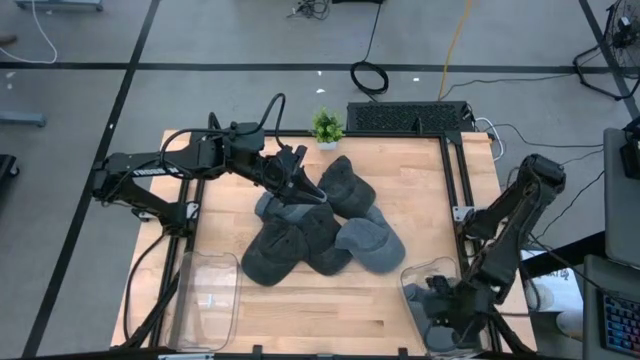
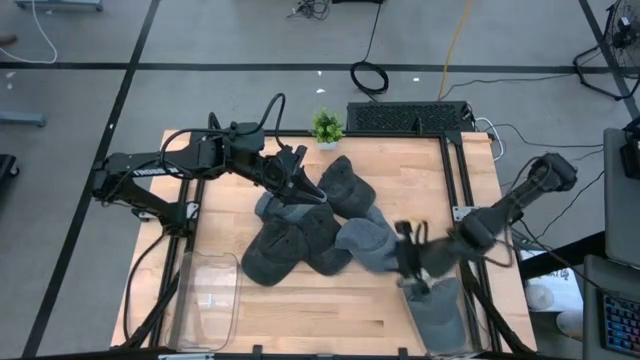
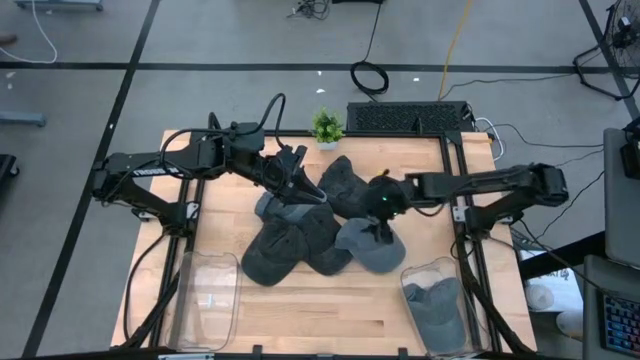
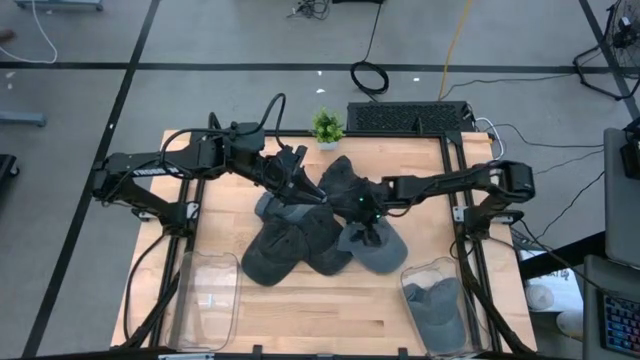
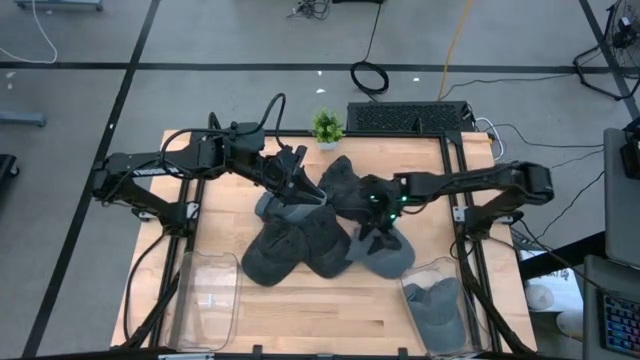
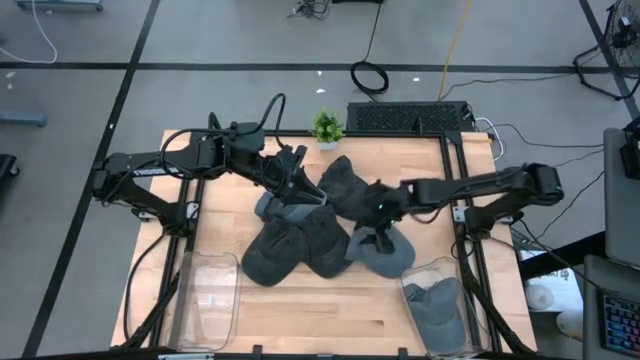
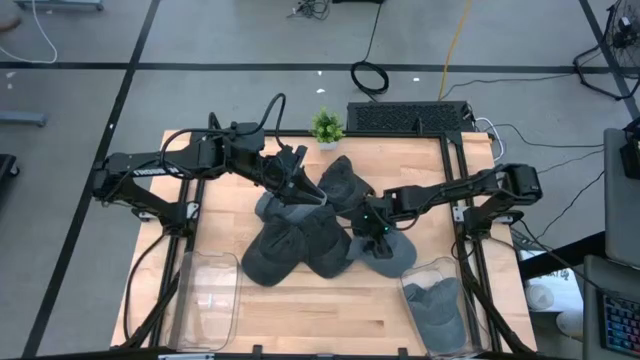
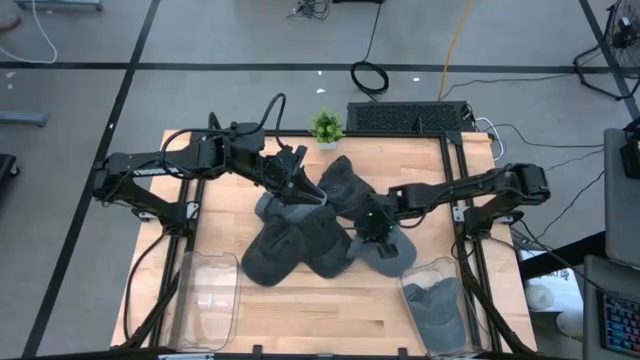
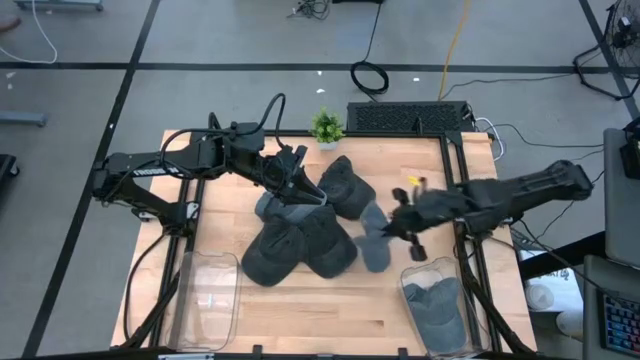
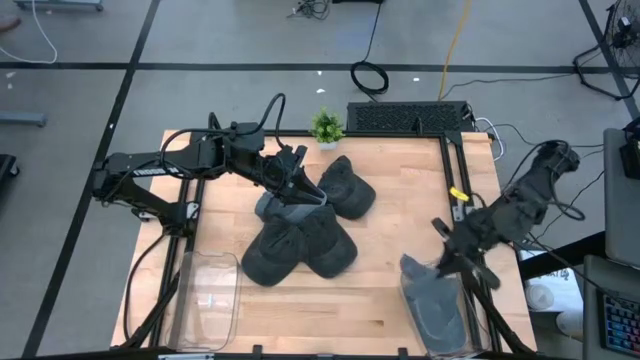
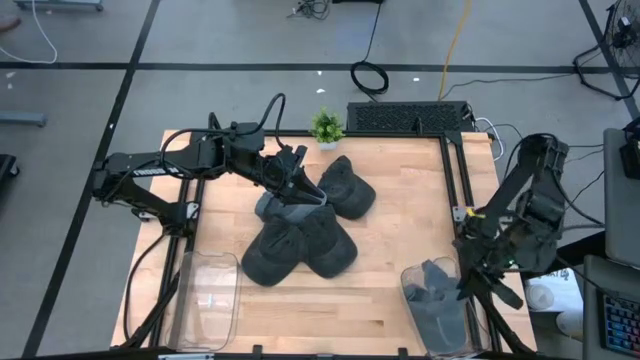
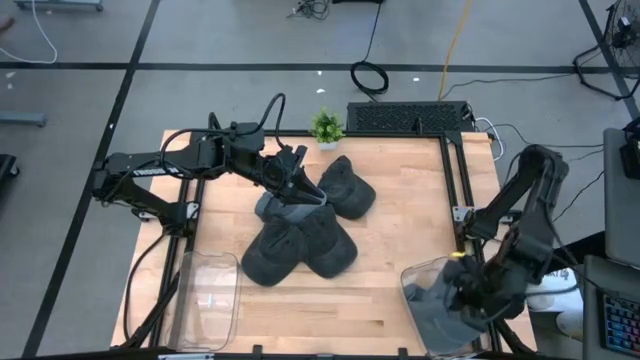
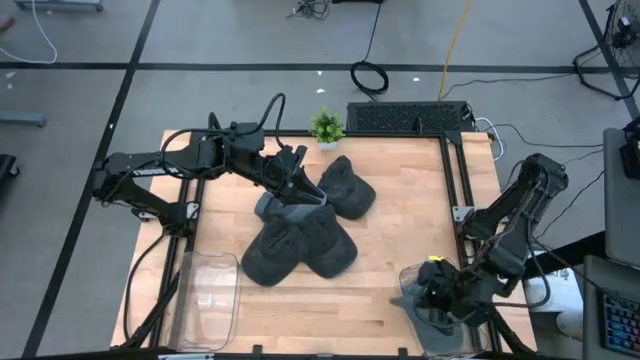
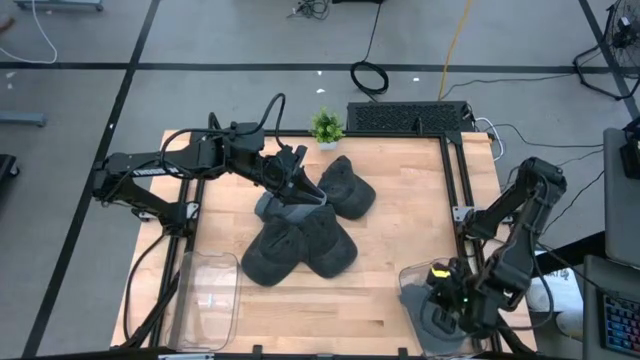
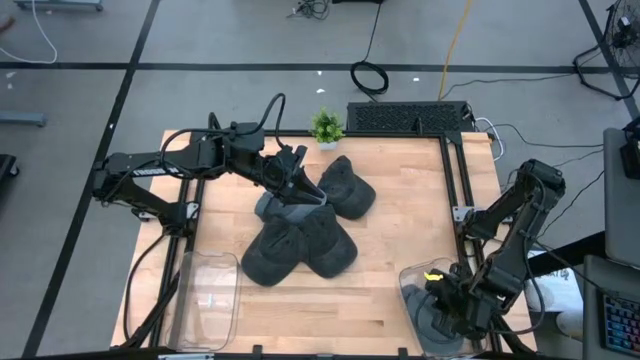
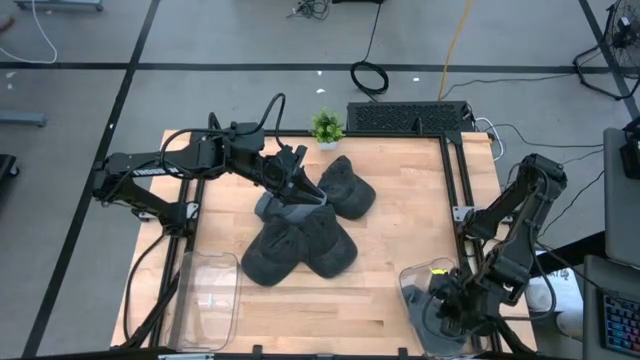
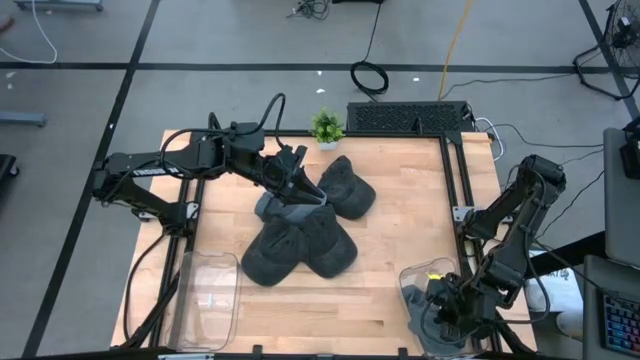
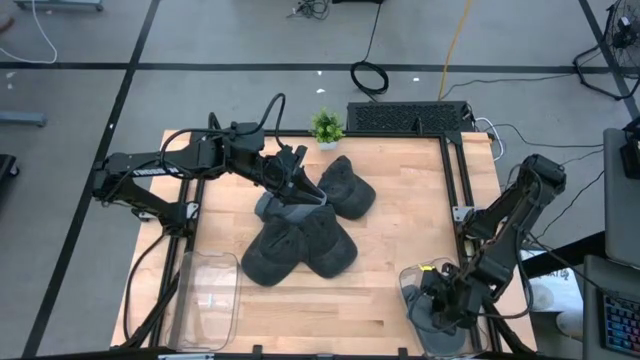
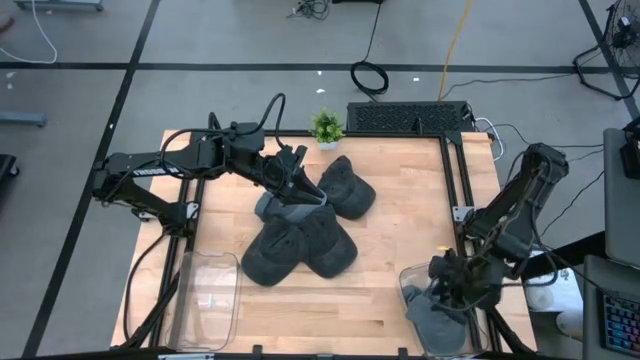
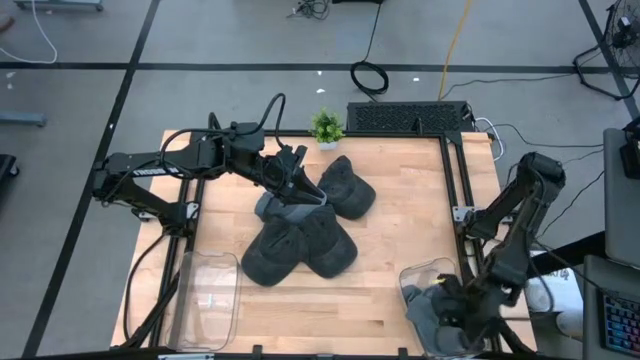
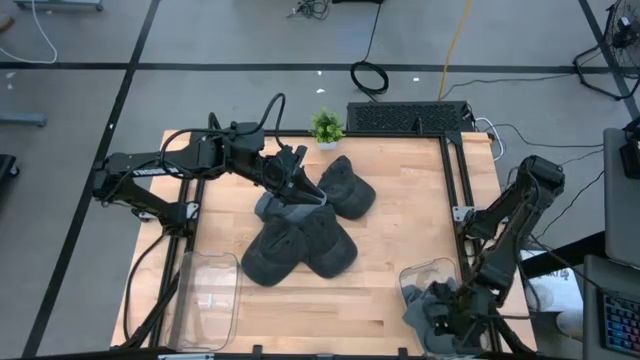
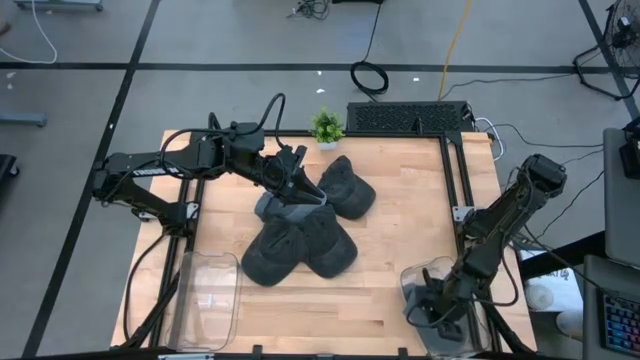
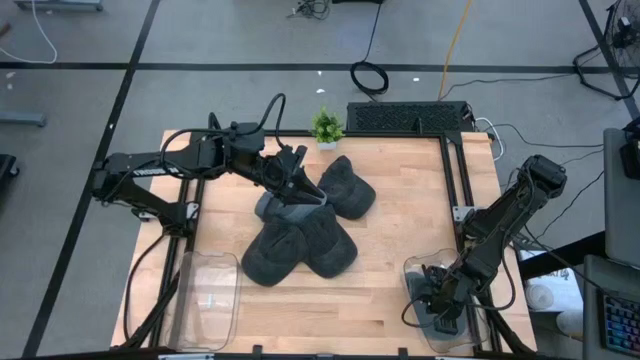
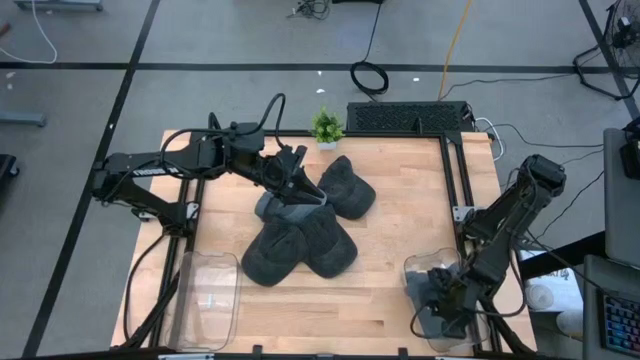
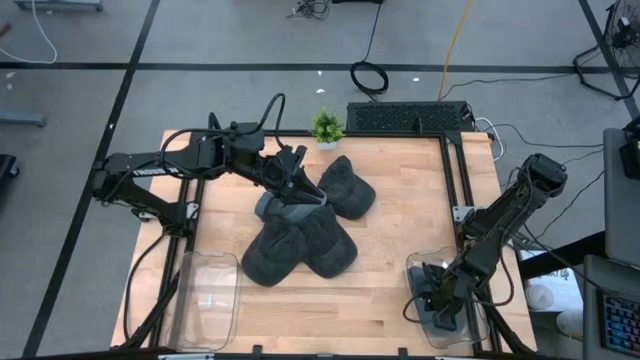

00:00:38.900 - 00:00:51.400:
Task: Pick & Place hat
Put the bottom gray cap into the right transparent bin

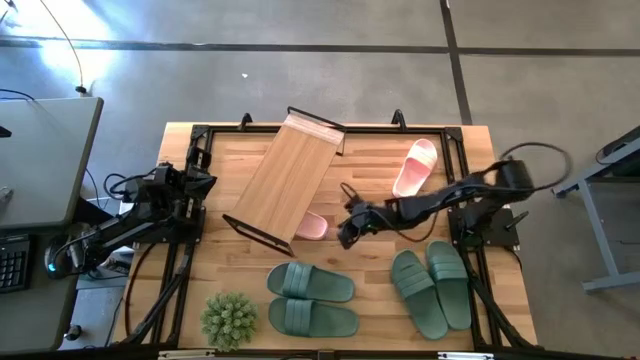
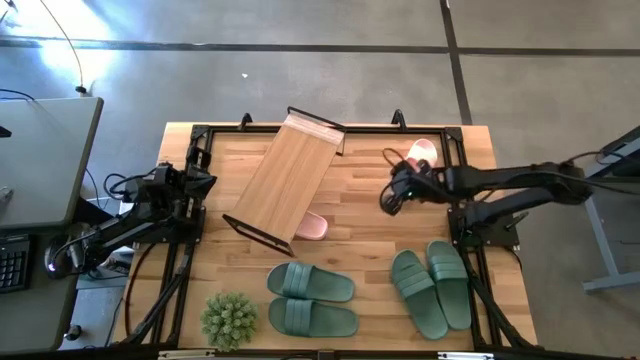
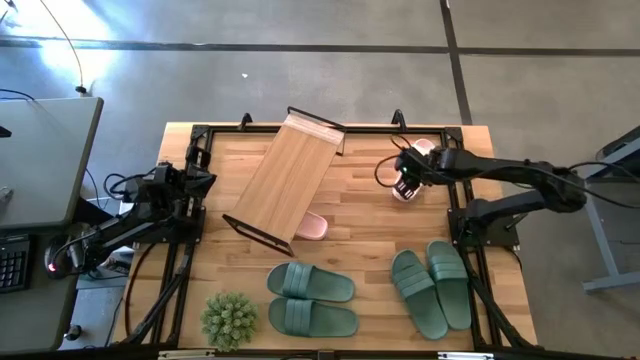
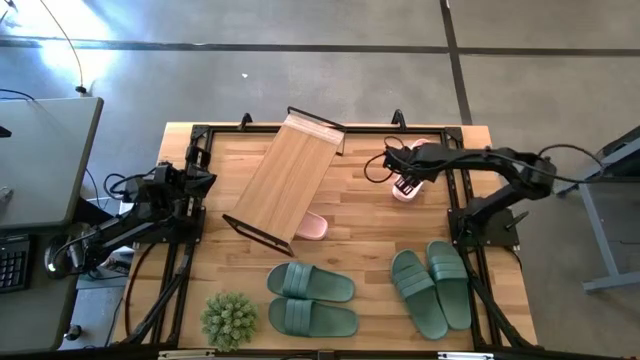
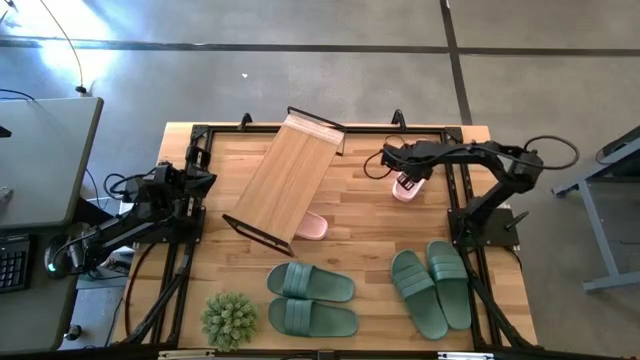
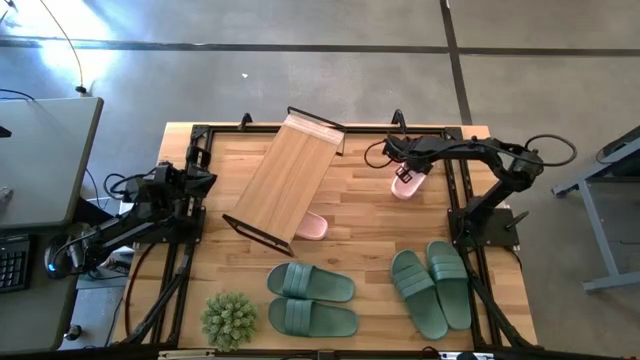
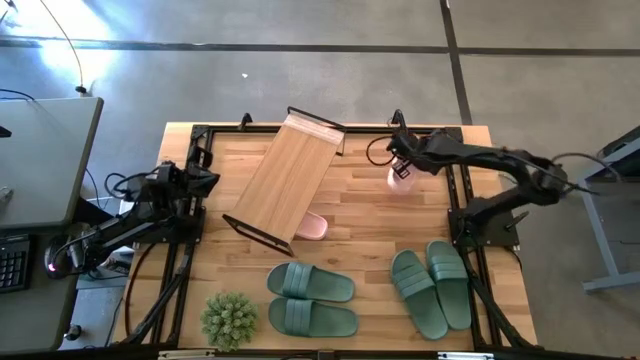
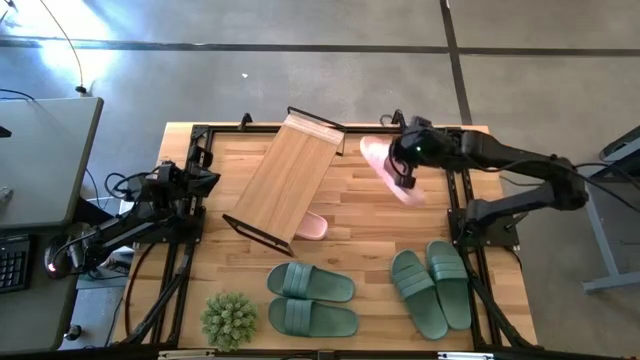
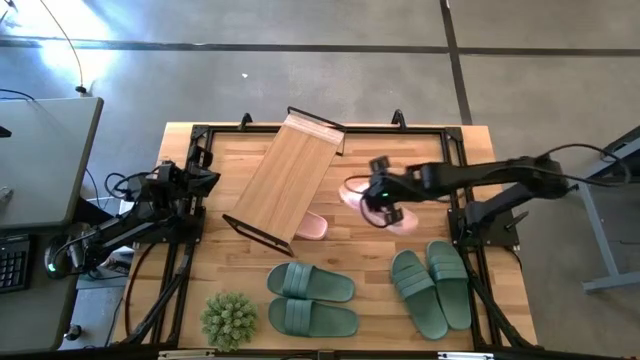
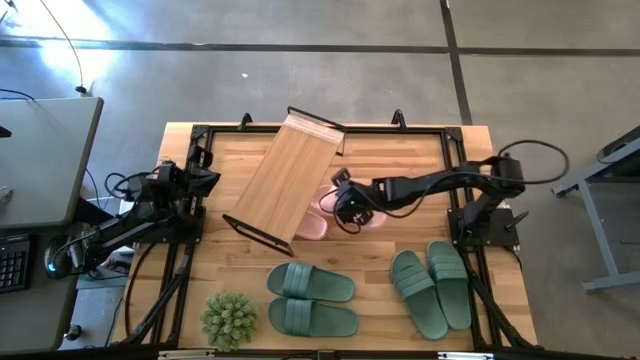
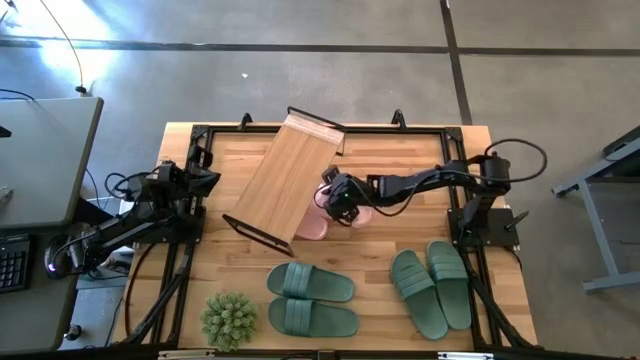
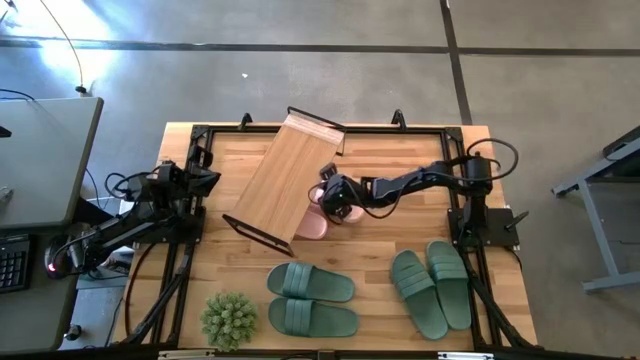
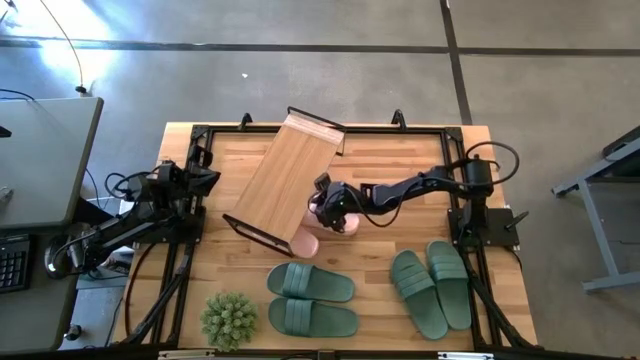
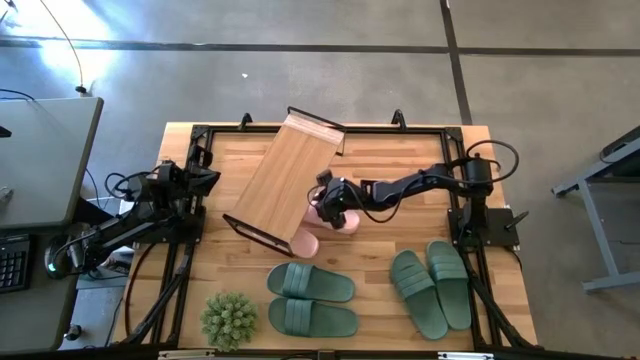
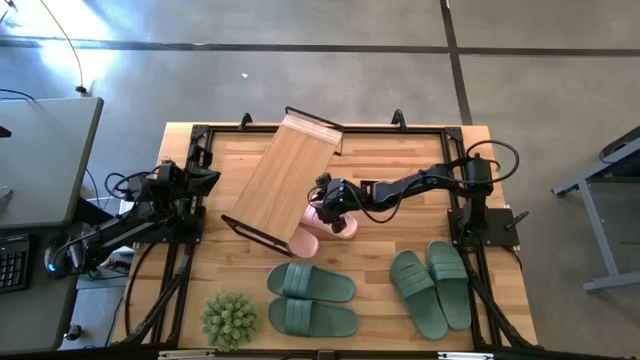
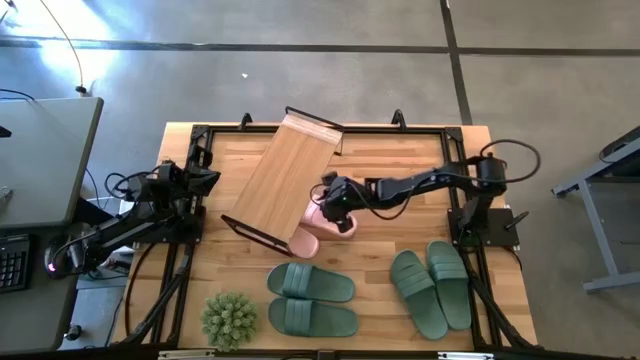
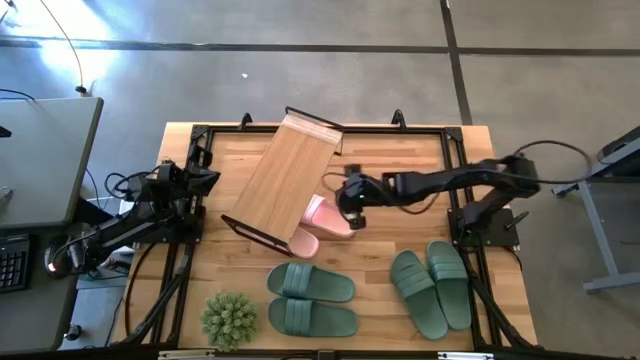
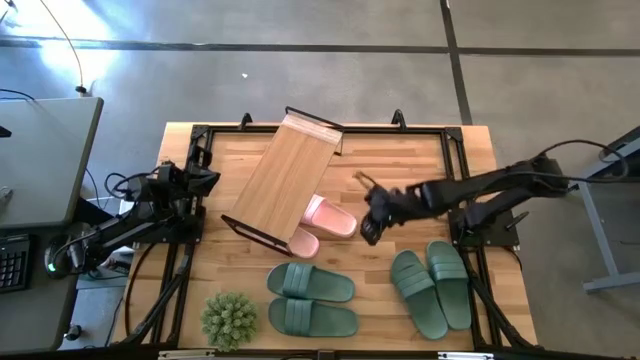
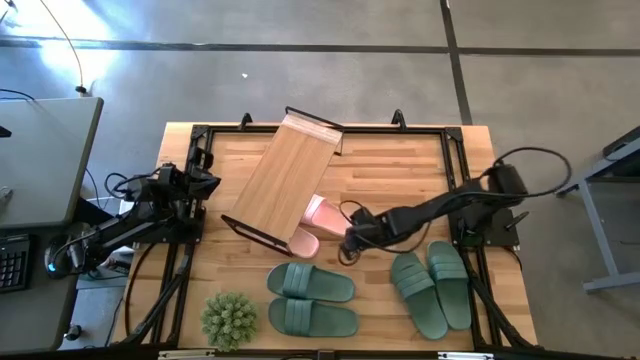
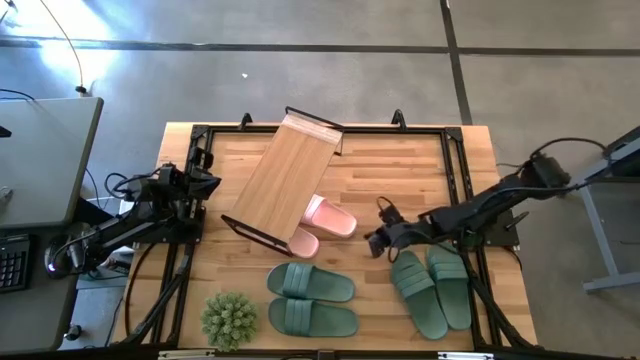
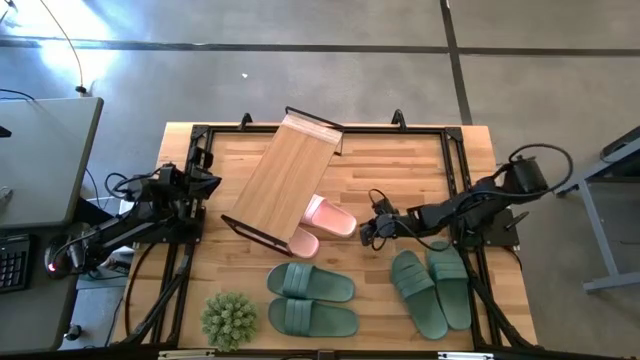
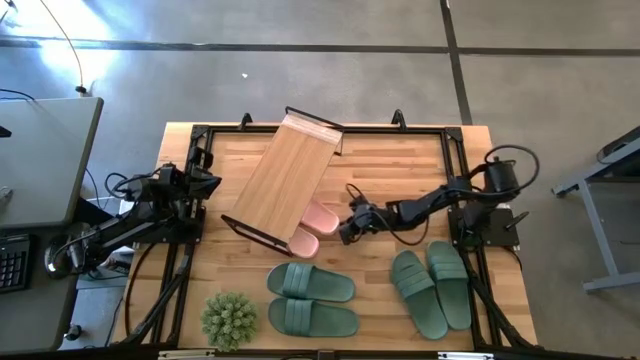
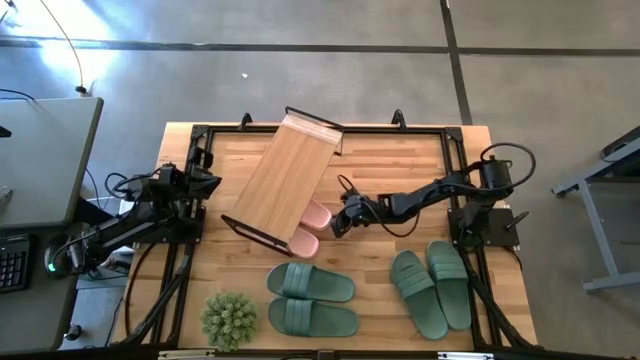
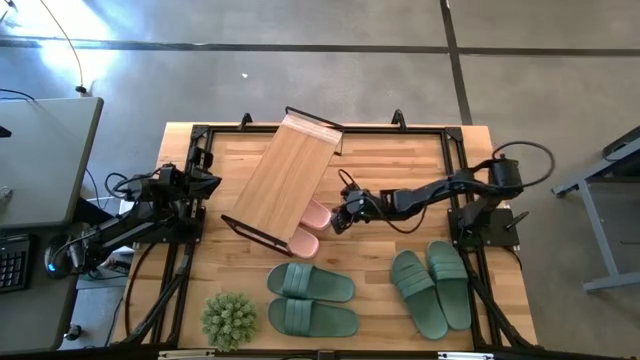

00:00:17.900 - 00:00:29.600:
Task: Pick and place slides into the shelf
Put the pink slide under the shelf
